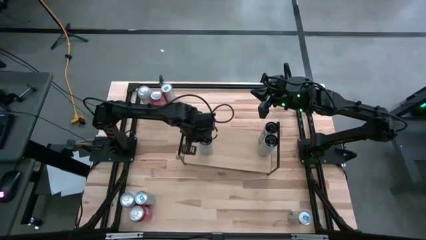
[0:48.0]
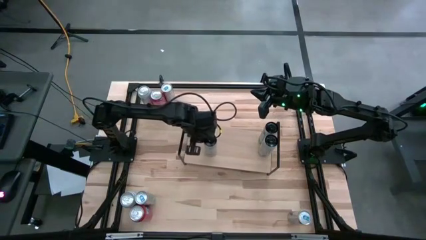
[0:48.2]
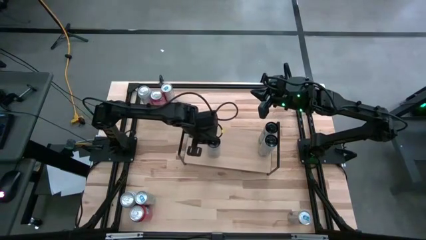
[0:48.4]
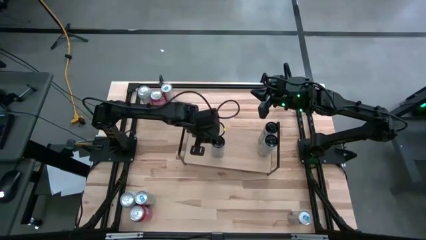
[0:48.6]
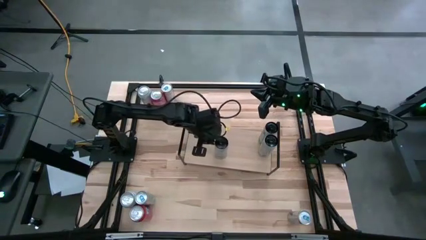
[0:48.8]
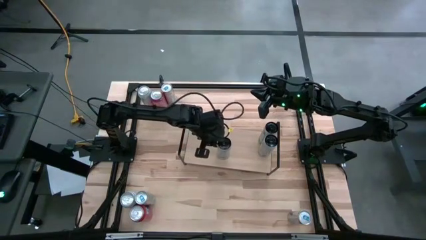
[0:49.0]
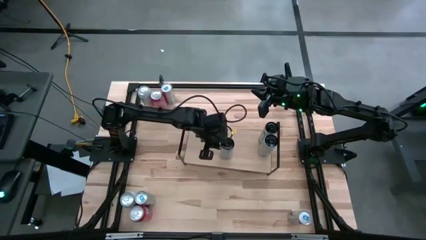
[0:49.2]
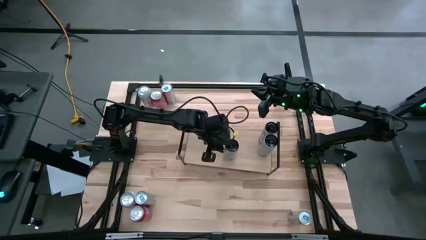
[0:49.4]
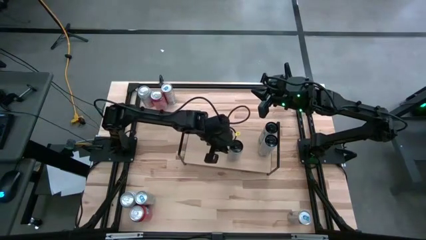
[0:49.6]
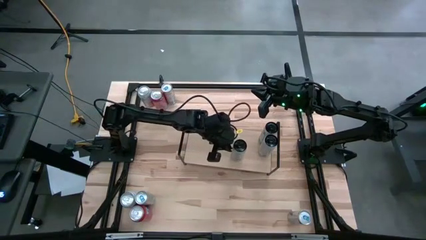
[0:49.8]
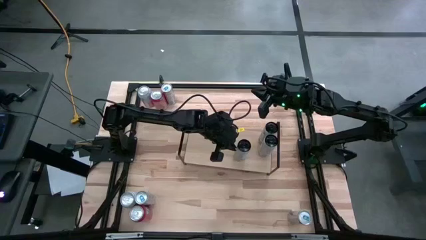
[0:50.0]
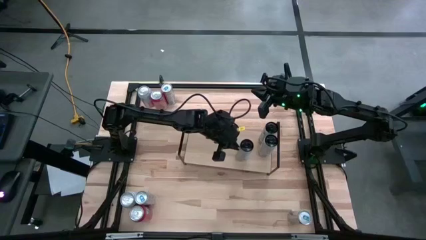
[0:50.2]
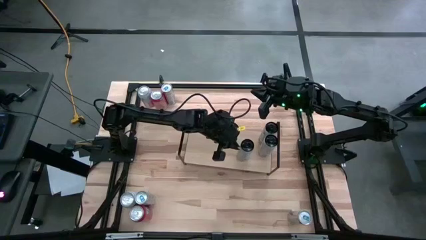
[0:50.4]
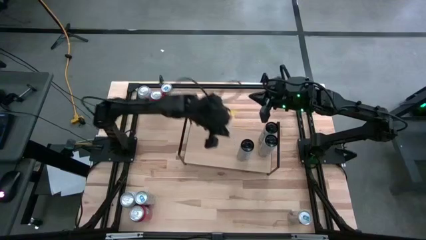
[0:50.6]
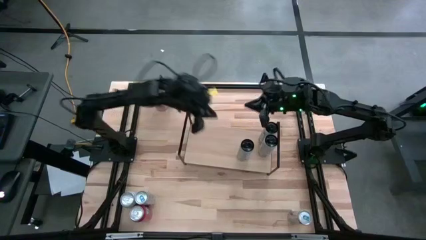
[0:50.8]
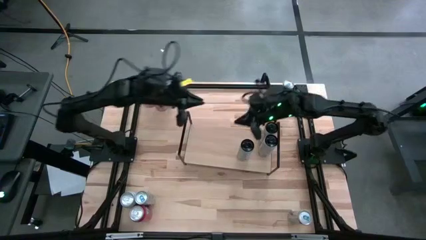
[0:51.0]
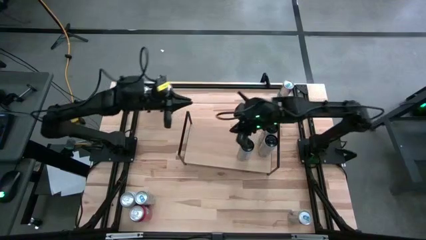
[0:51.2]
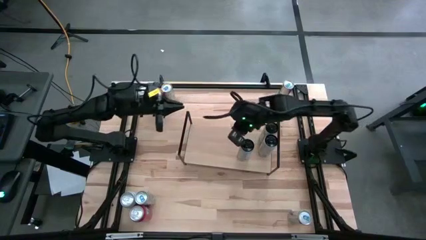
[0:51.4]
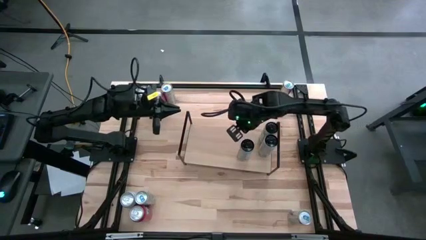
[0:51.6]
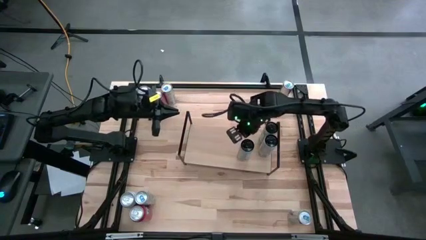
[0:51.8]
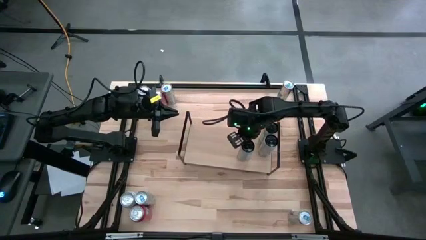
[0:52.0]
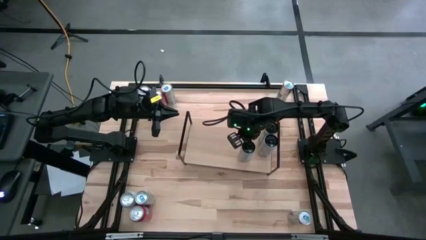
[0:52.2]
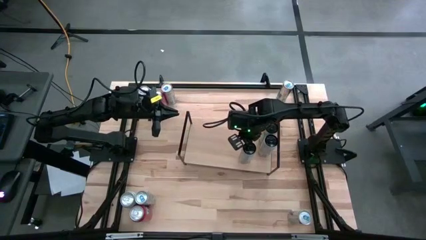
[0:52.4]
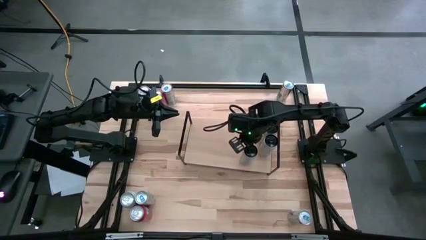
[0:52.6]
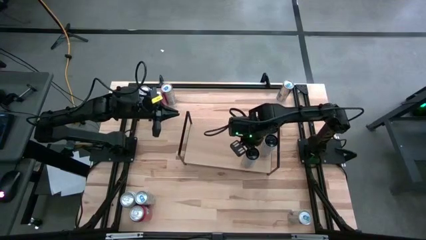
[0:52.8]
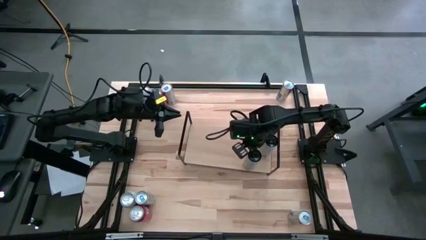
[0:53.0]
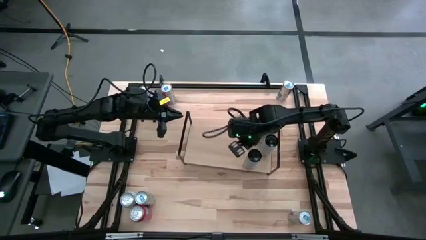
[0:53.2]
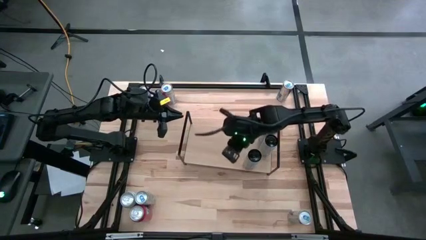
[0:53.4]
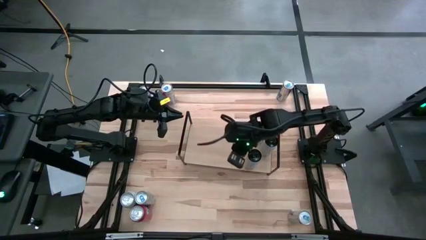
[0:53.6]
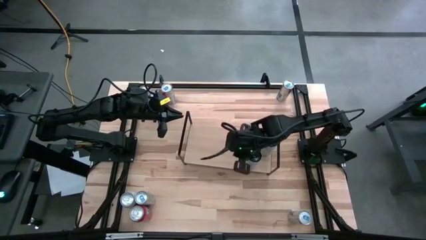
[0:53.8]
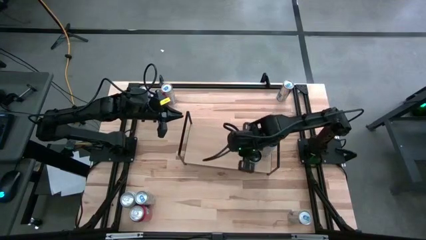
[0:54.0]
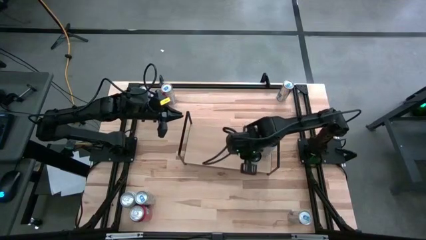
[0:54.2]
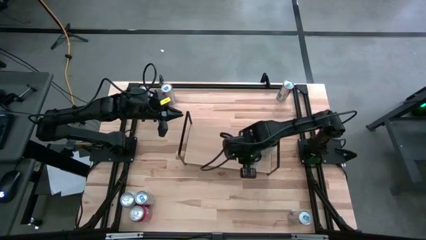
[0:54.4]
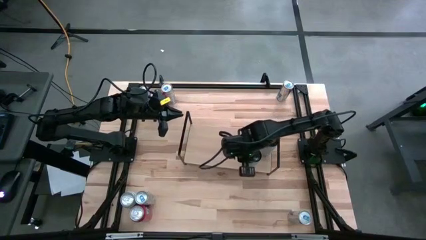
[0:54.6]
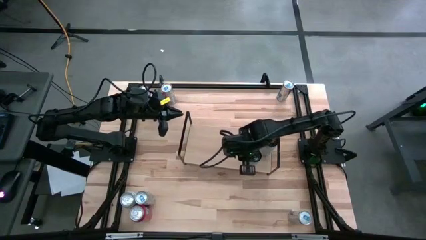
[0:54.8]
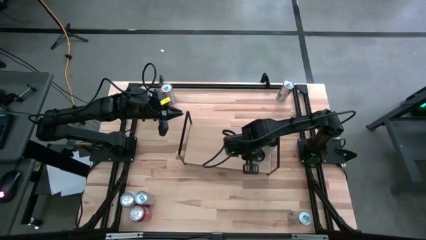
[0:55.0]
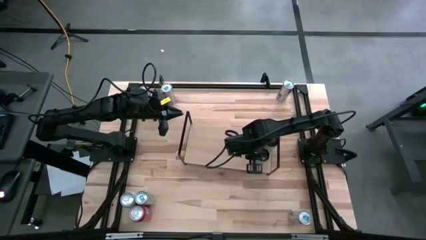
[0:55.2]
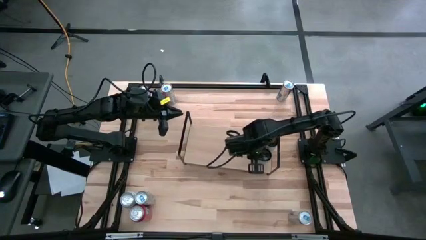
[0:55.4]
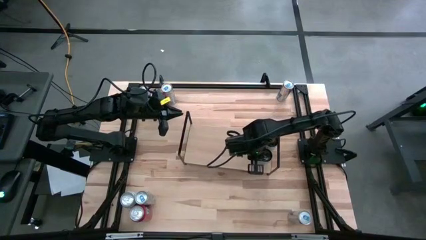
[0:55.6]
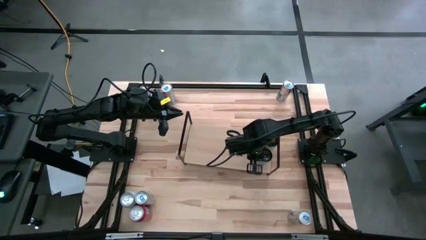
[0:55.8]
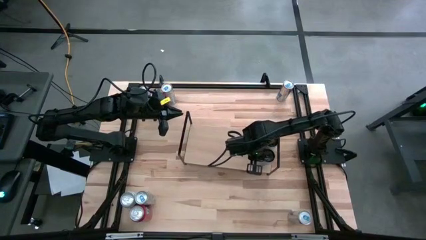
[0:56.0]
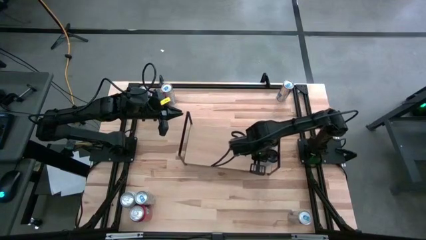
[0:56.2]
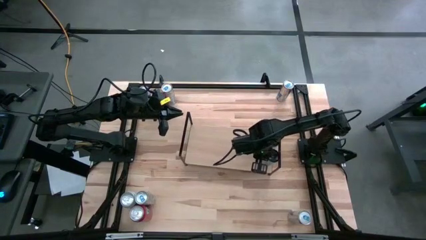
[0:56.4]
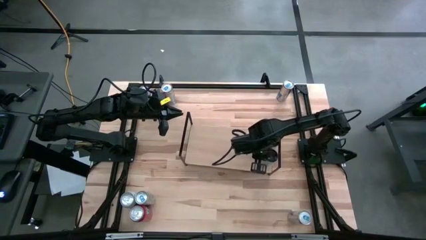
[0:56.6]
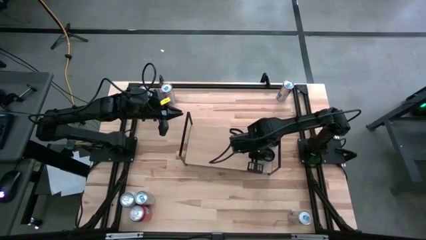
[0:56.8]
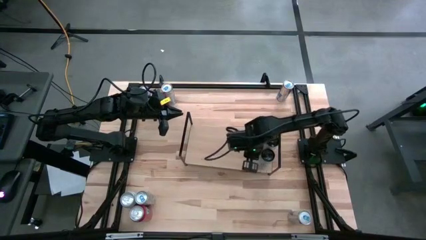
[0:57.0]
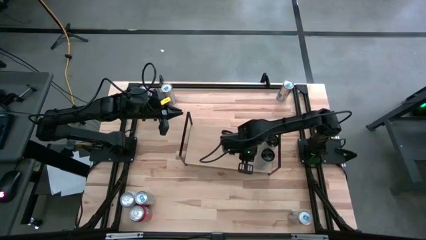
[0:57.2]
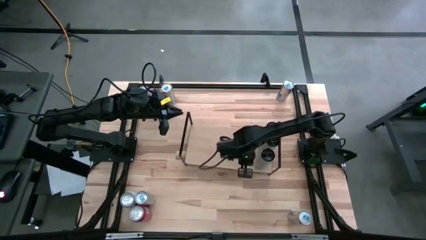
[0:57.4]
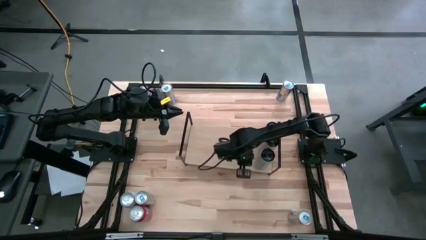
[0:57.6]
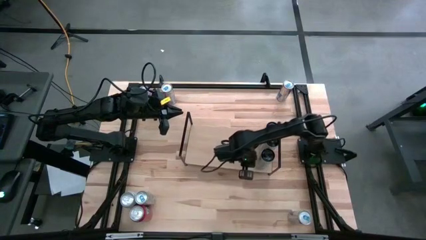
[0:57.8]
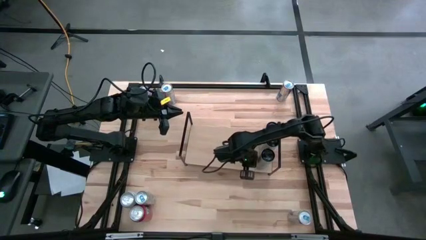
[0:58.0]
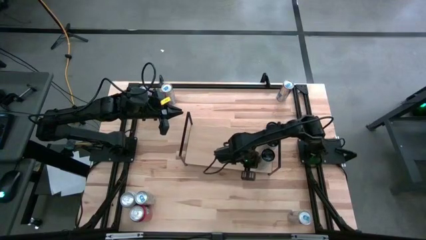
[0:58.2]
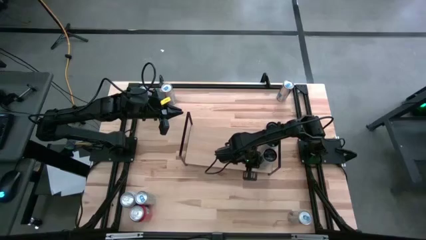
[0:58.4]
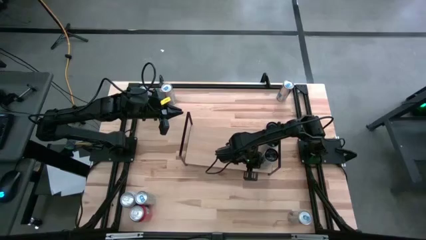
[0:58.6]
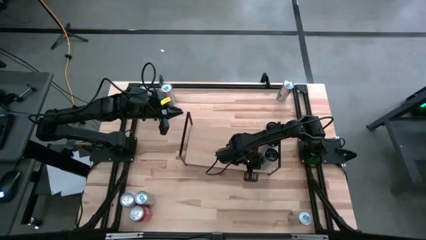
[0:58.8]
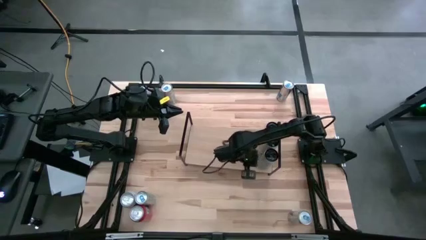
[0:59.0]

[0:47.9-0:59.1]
Task: Place canned beverage on shelf
Put the white soda can on the shelf aligned with the other white soda cans

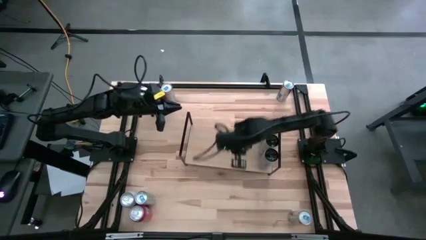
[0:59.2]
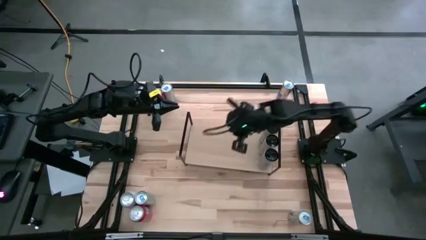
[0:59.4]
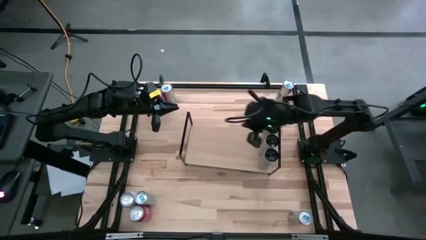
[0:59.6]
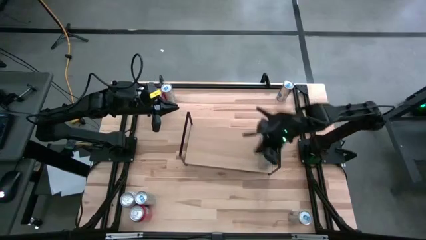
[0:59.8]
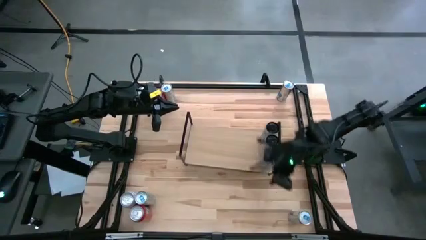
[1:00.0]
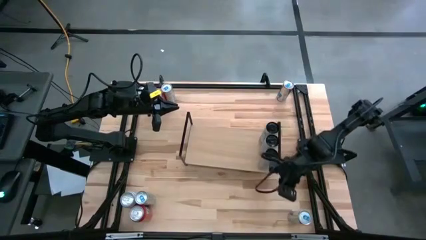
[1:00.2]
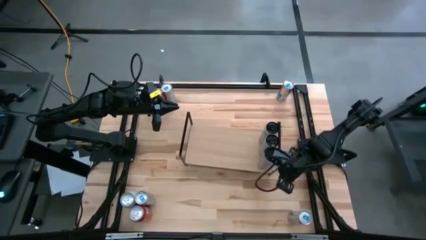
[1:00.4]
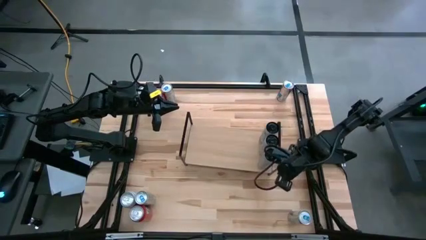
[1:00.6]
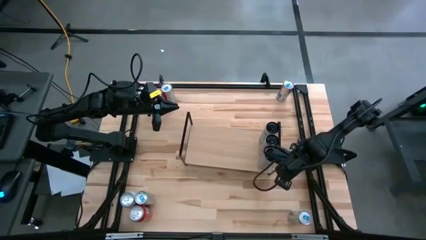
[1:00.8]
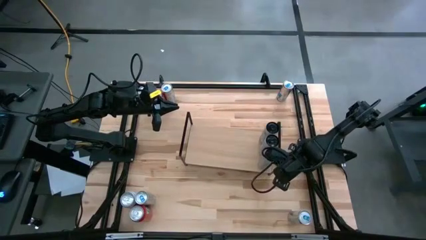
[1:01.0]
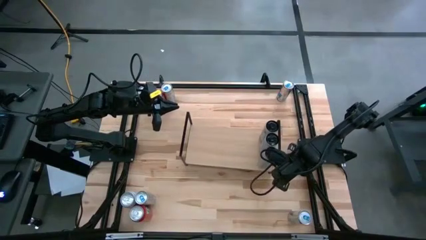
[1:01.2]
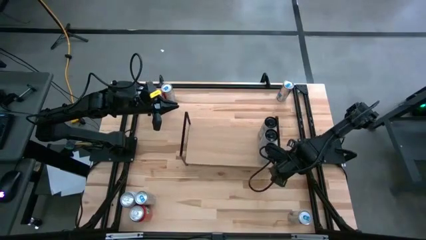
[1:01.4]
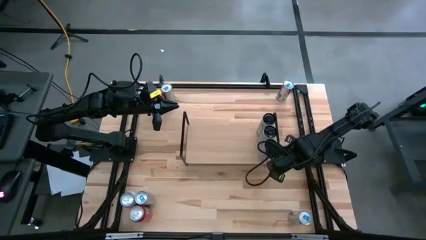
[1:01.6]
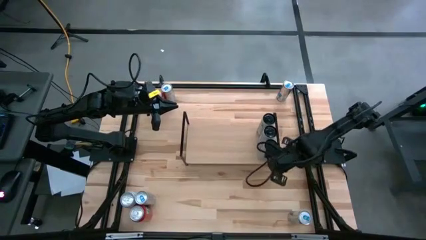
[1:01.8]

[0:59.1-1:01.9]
Adjust the shelf

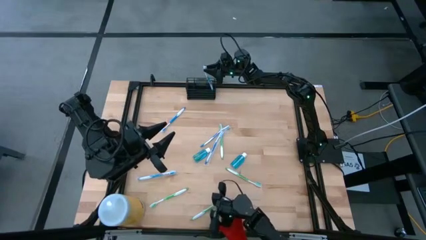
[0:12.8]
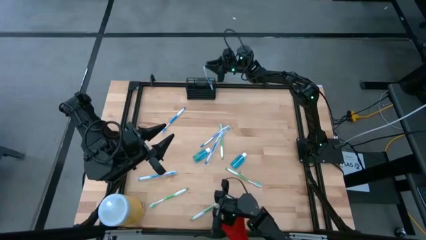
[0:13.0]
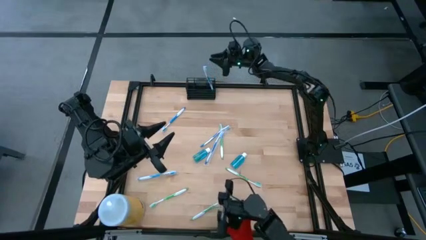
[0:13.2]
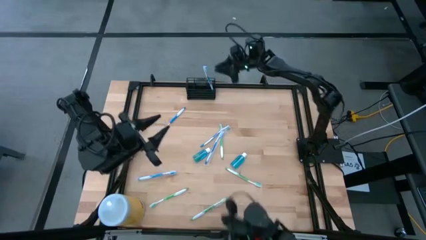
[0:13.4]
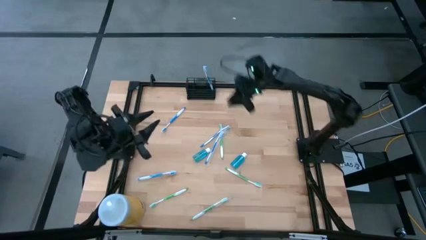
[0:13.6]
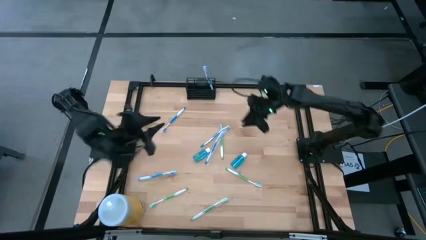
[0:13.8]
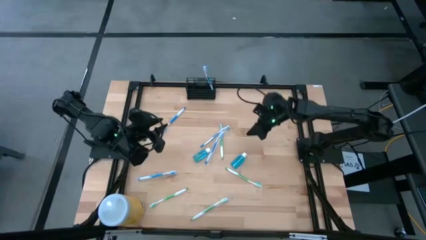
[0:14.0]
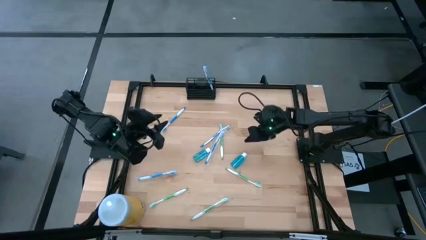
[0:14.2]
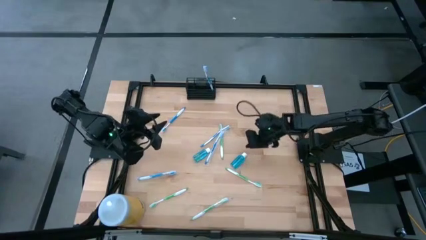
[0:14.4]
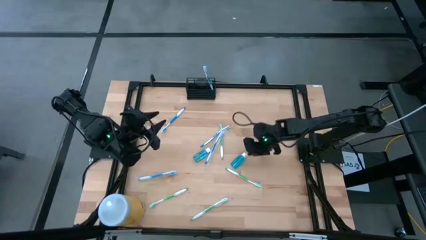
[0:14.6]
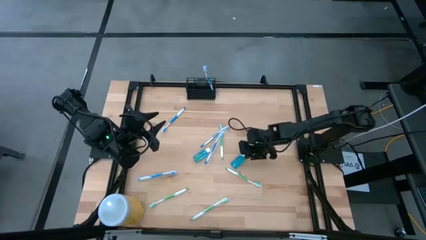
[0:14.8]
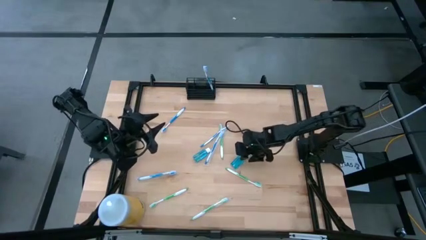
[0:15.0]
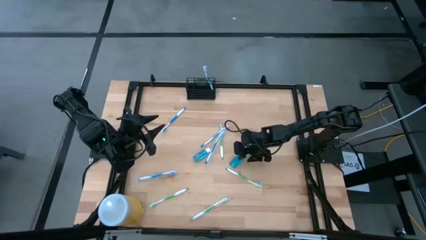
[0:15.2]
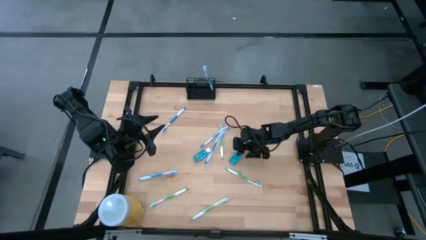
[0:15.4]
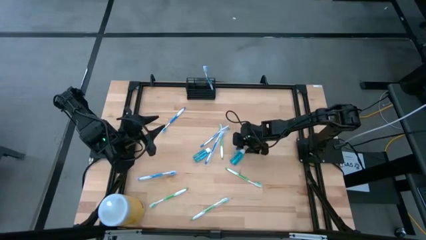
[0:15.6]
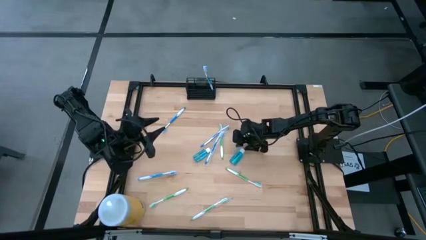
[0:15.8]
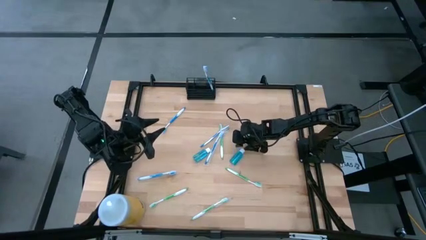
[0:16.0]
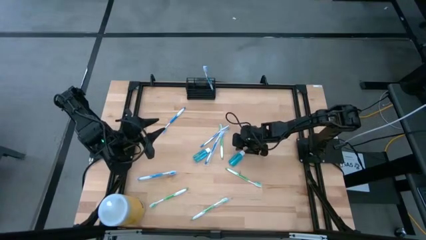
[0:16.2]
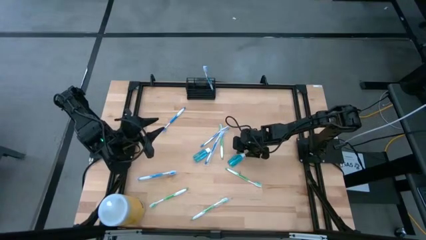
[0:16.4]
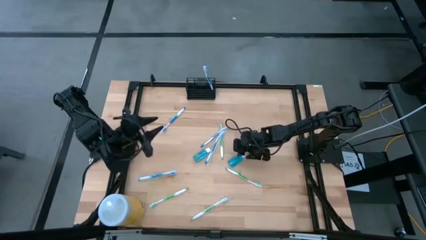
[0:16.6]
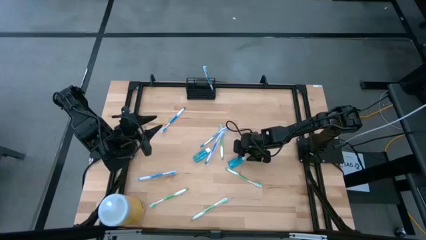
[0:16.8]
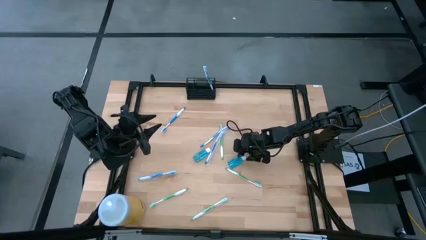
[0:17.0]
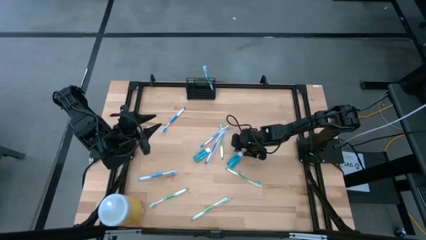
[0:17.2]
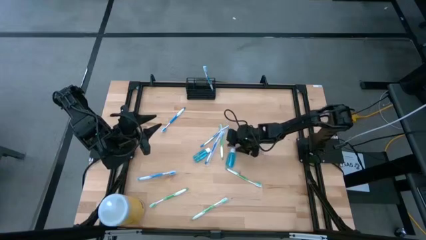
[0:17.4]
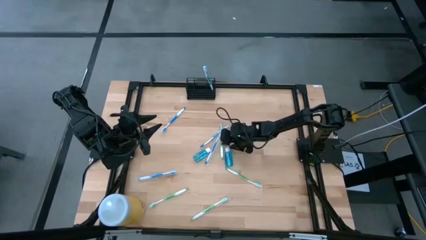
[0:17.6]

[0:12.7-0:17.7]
Task: Pick & Place toothbrushing station
Put the mouthwash into the wire organizer
